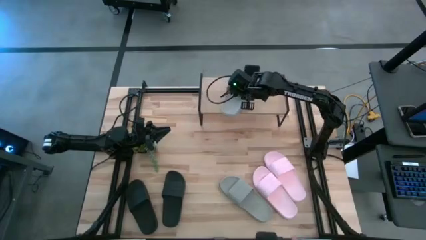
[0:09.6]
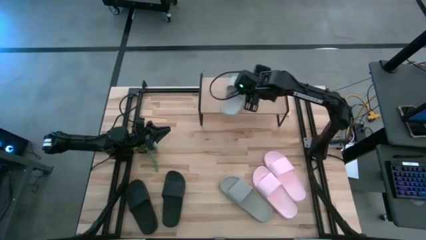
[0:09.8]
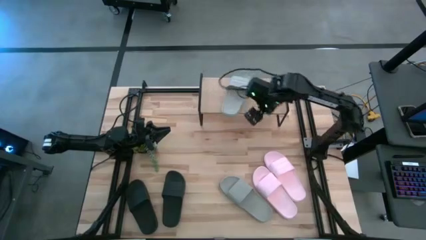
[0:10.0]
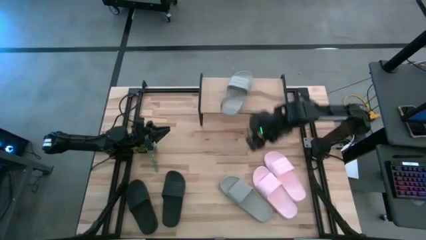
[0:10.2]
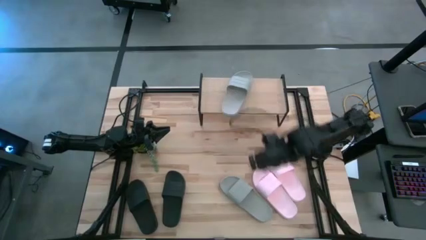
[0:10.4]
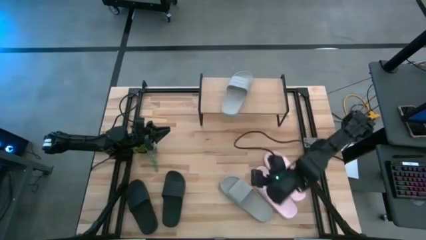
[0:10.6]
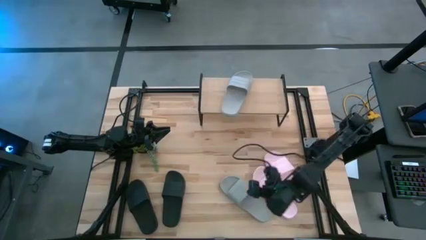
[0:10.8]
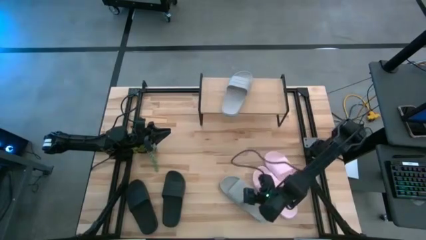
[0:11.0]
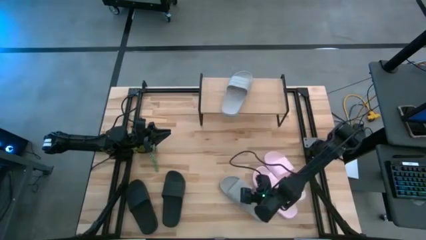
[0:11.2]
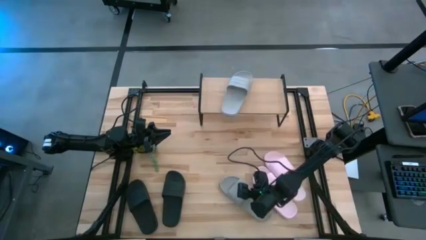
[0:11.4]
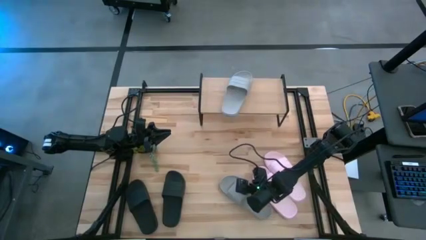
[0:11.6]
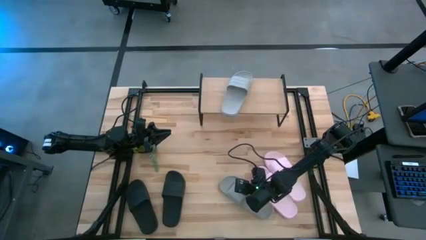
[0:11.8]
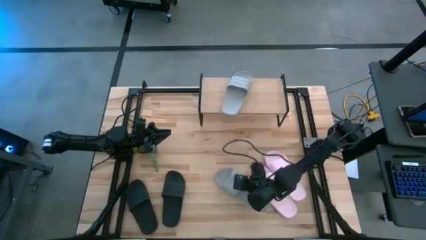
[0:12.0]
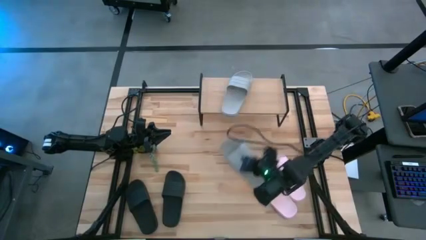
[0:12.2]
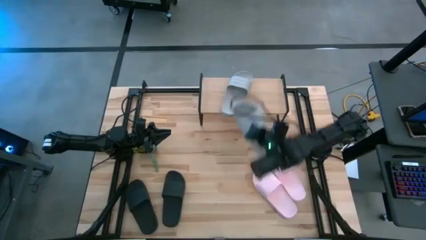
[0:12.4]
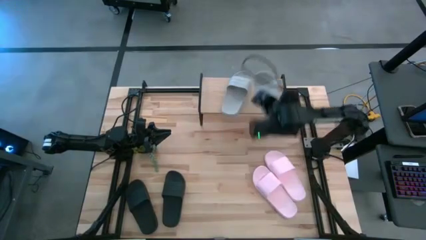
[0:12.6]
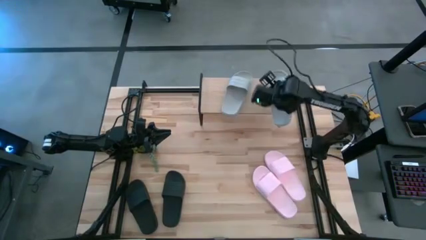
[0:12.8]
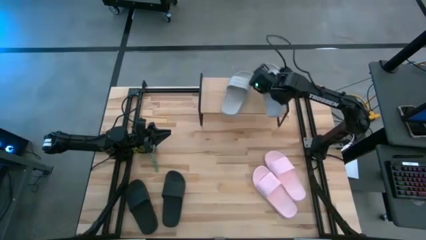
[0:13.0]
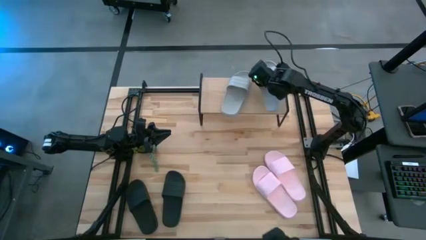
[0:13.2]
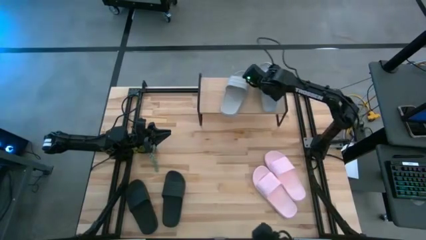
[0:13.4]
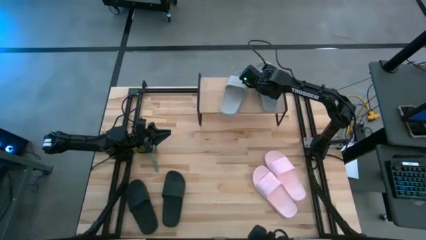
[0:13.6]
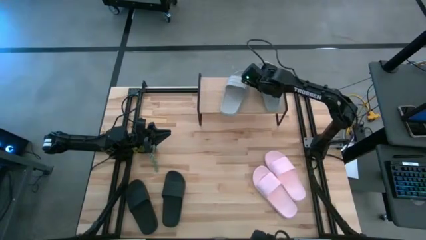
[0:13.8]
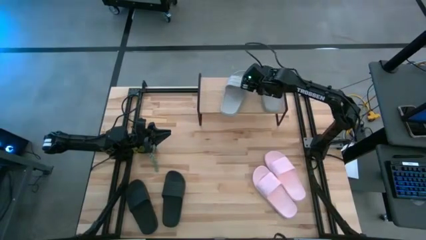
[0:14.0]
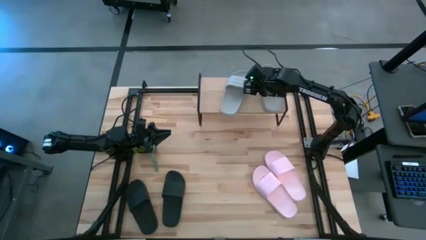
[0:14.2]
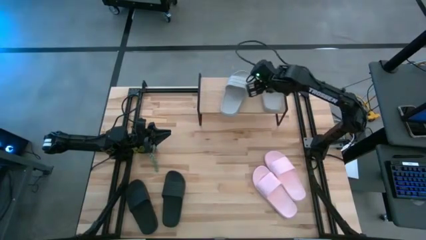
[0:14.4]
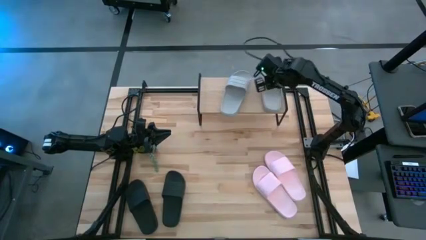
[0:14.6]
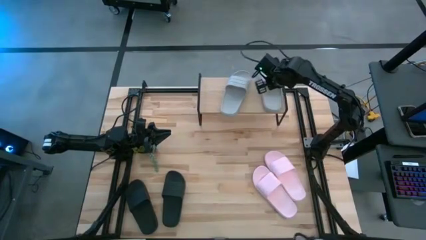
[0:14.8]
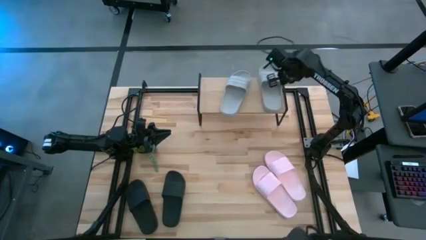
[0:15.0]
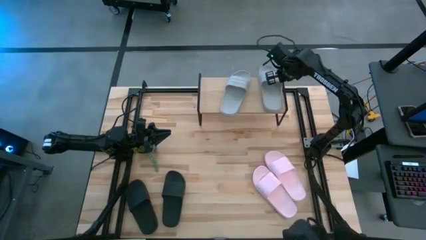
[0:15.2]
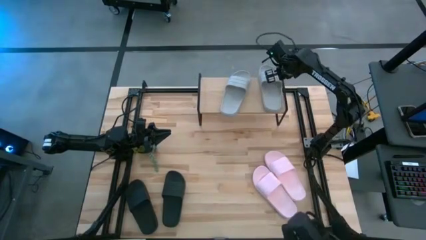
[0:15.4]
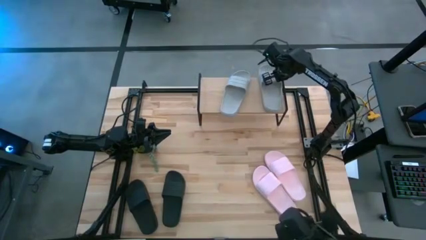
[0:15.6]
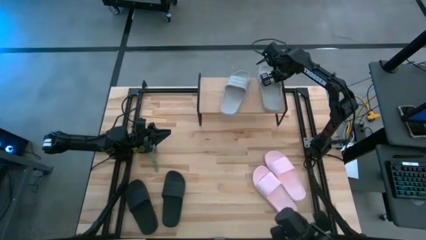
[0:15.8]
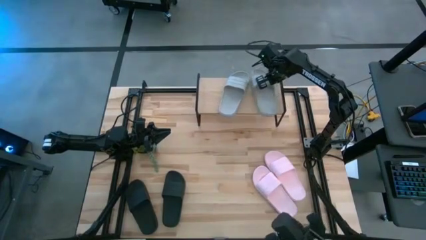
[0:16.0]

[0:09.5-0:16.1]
Task: Pick and place slides into the shelf
Put the gray right slipper on the shelf

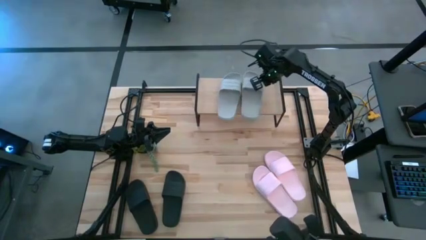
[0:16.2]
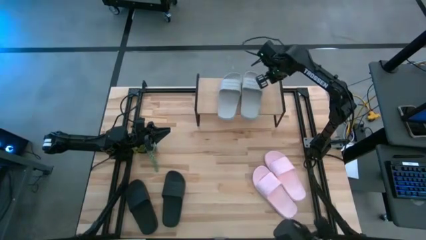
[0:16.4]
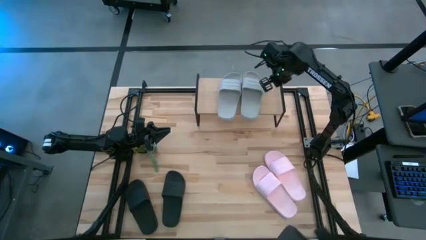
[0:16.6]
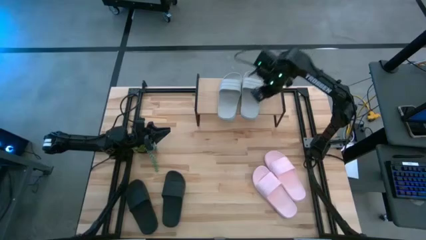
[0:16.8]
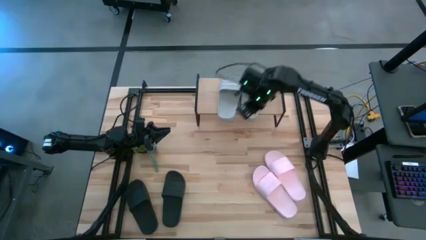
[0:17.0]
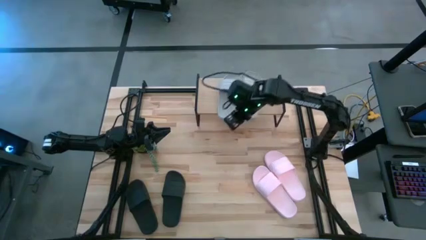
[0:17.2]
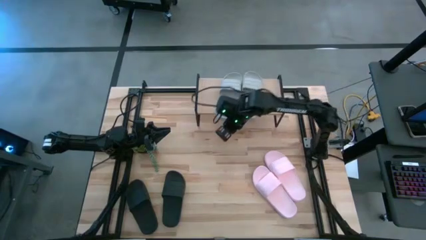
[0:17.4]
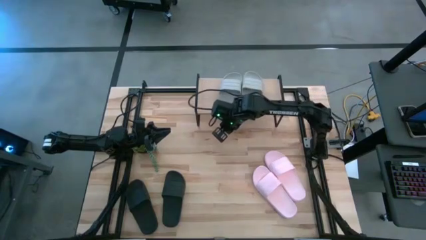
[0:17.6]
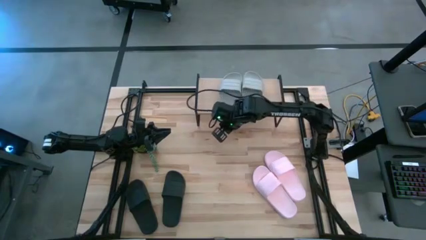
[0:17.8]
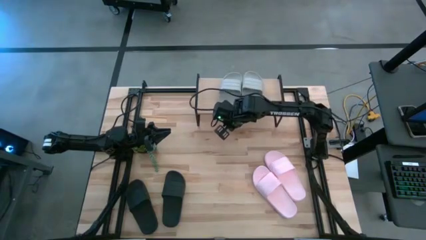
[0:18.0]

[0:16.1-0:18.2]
Adjust the gray left slipper

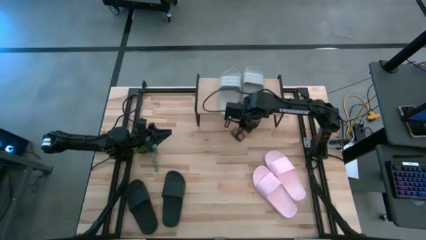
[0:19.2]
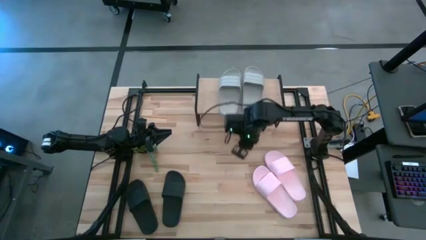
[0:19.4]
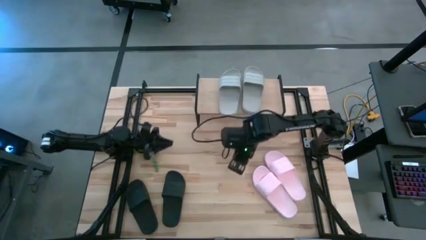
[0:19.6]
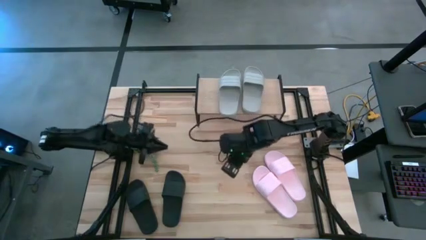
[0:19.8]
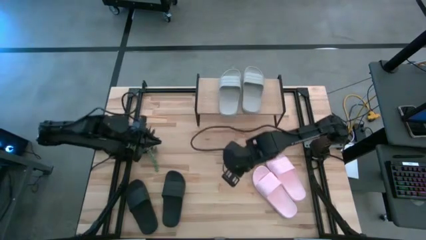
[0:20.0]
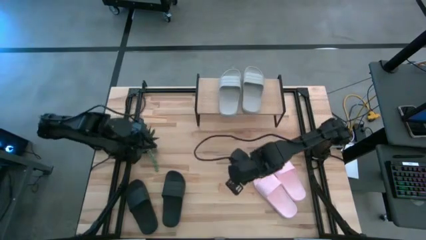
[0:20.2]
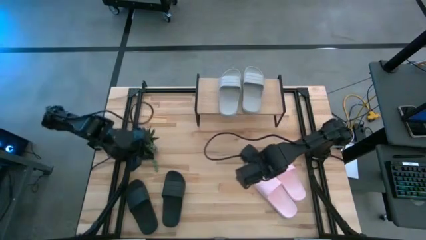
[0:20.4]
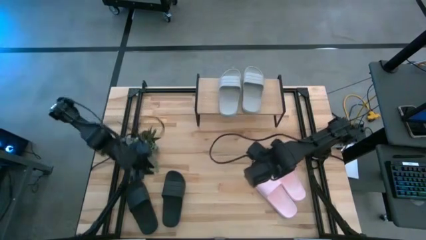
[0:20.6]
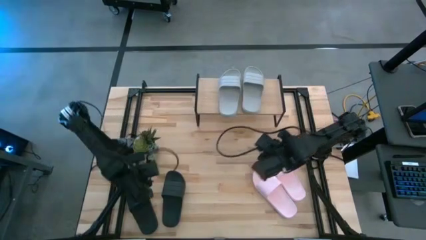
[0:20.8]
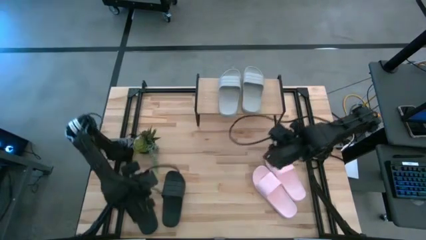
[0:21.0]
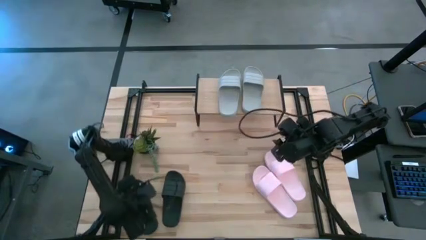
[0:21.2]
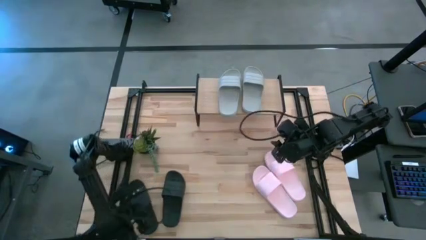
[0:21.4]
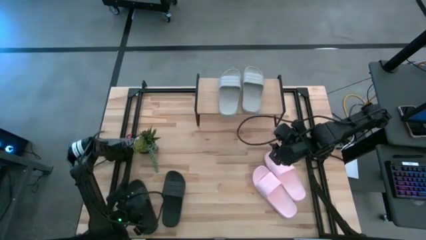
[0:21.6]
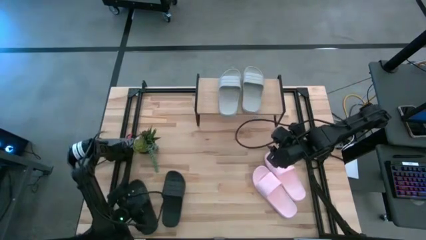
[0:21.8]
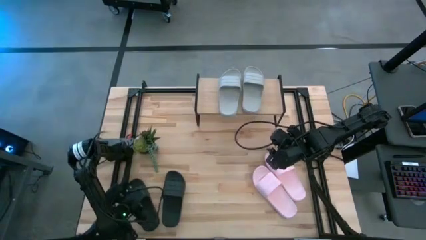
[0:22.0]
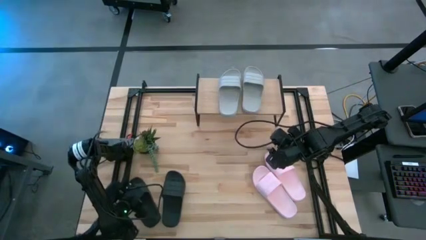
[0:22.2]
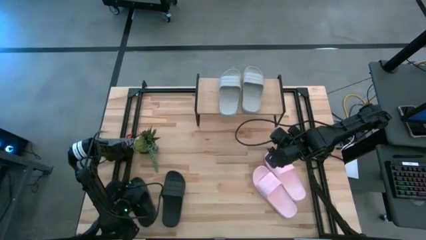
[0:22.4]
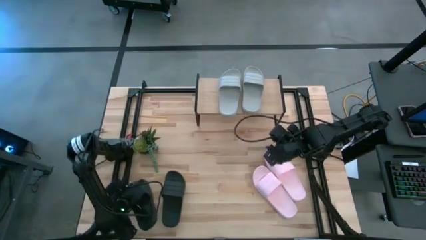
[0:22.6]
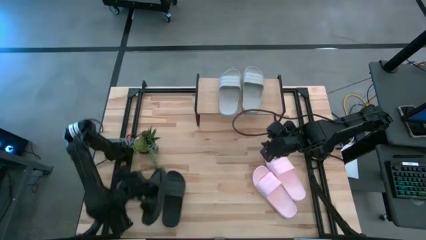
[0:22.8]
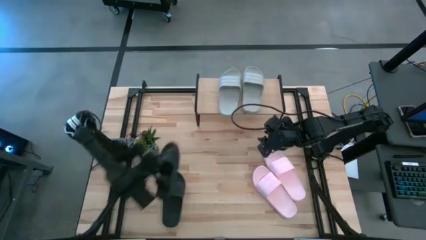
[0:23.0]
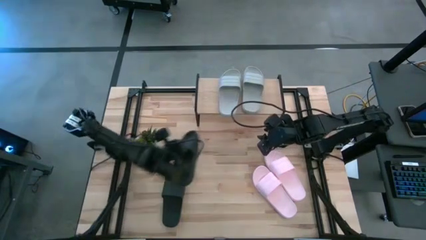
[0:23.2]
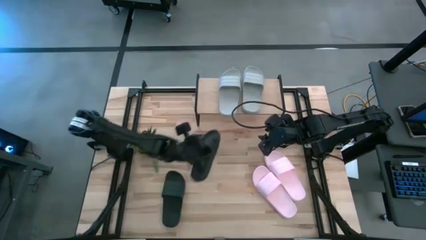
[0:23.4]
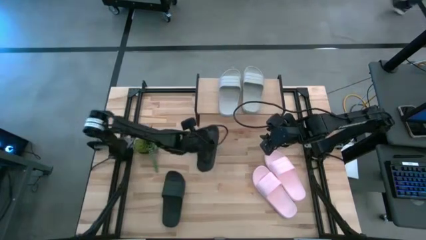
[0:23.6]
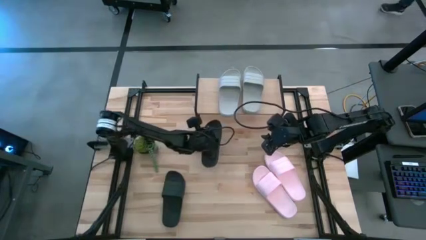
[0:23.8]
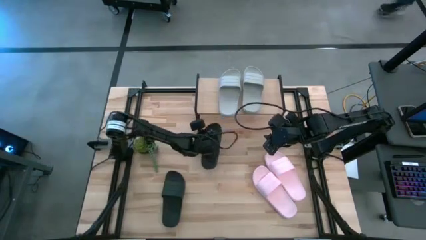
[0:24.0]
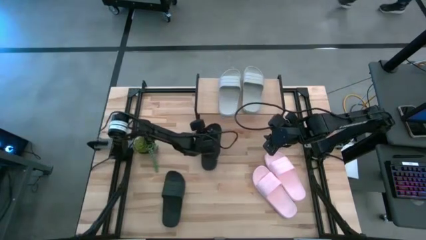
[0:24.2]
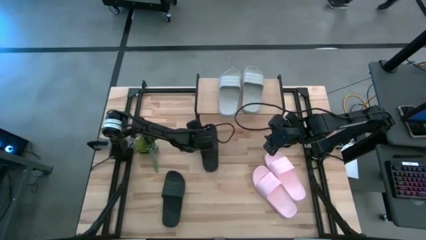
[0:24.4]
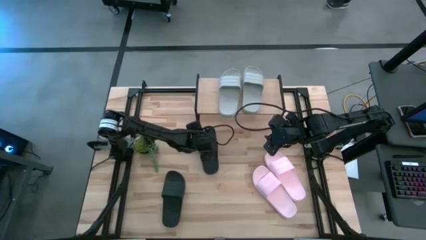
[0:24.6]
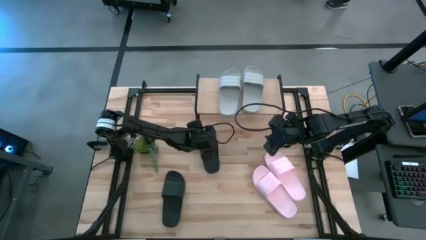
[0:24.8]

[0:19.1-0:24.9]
Move the black left slipper to the top center of the table

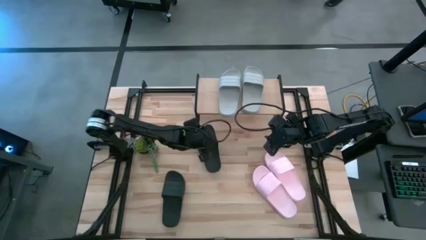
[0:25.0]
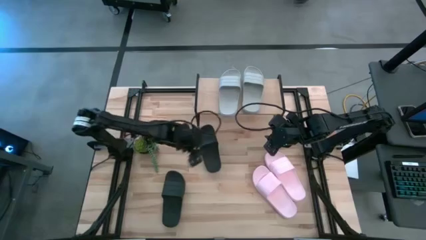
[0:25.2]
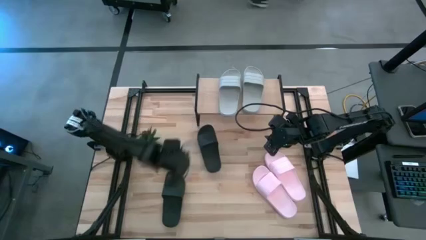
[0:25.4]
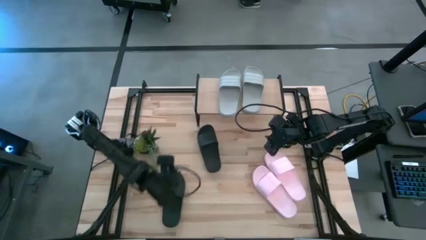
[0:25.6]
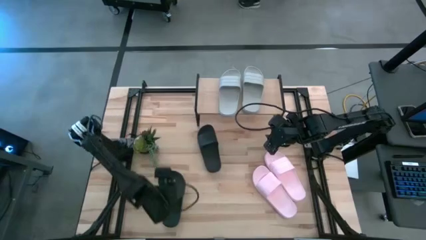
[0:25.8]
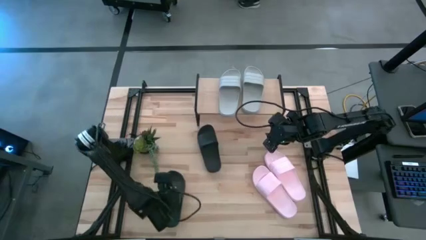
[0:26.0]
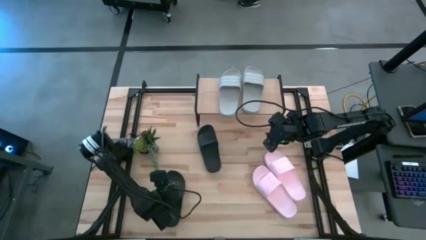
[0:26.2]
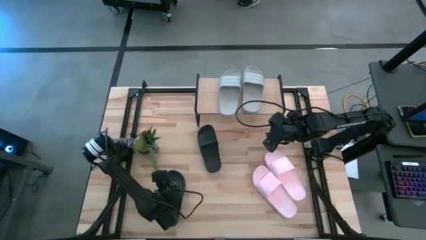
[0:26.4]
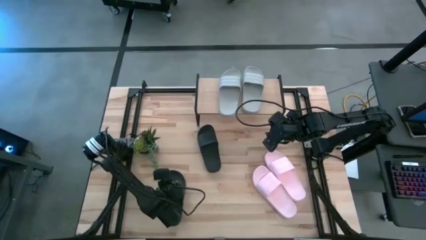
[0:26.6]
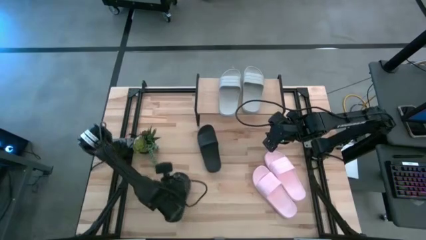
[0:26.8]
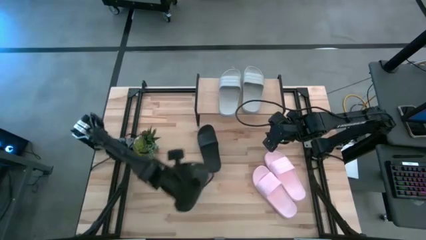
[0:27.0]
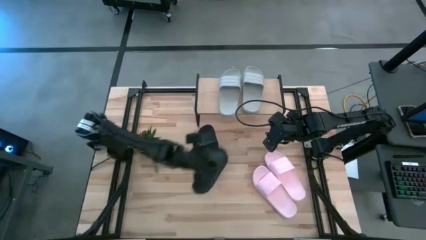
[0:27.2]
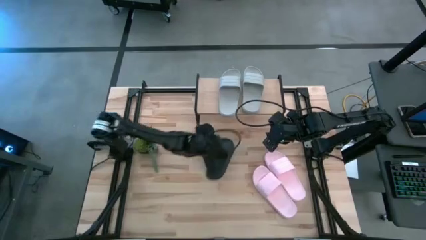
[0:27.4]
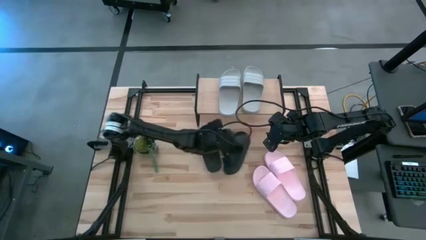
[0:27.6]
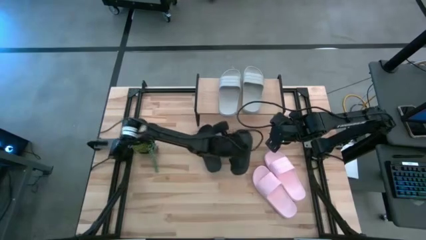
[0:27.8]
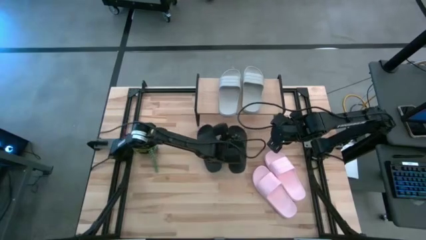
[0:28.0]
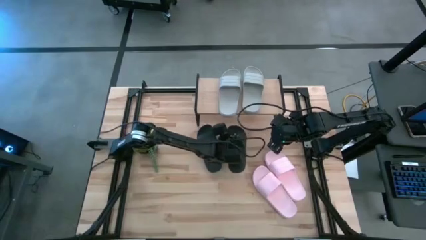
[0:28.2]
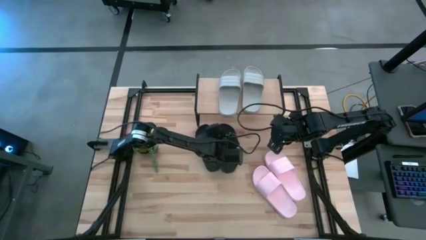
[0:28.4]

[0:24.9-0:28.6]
Move the black right slipper to the top center of the table
